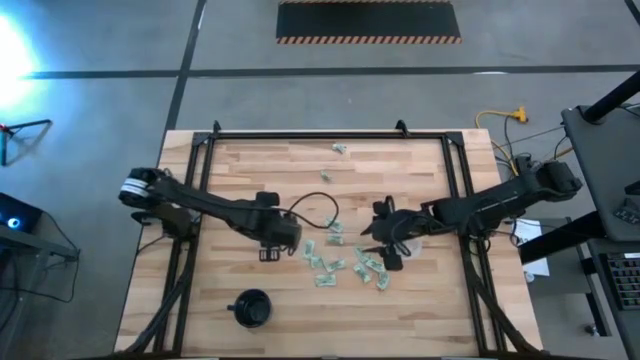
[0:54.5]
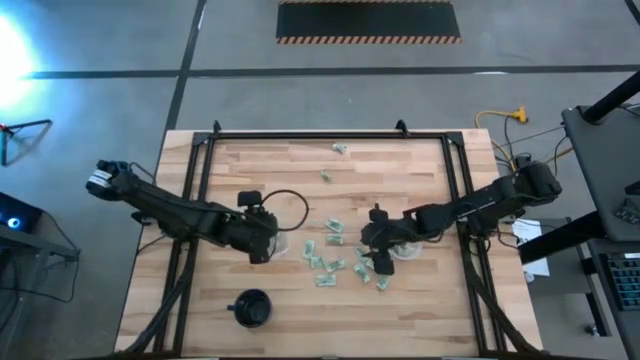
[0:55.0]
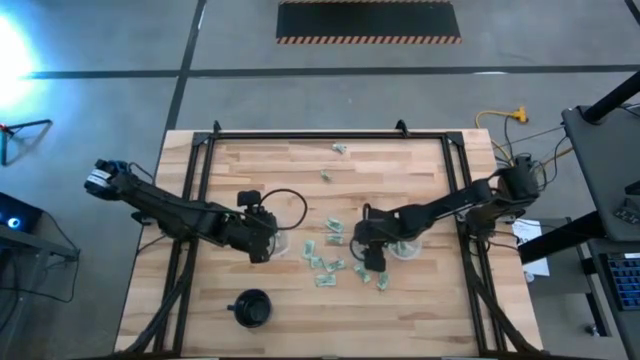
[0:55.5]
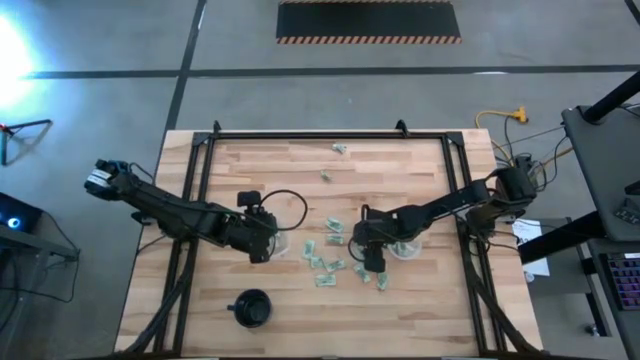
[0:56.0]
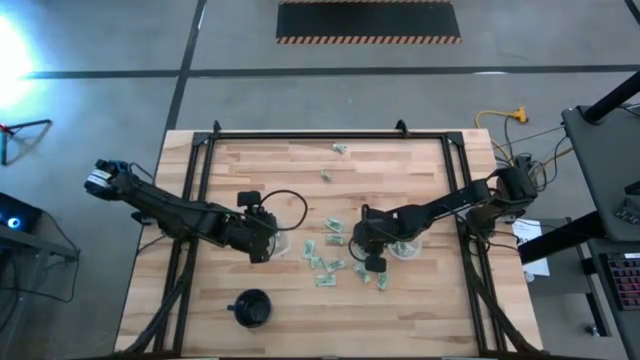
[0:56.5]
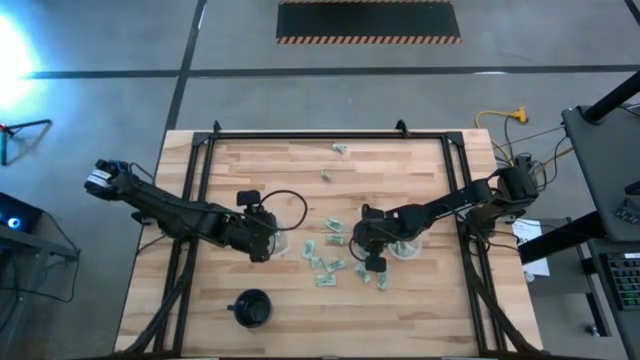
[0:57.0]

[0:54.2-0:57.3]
Task: Pick and place Stevia / Truvia into bins
Put the stevia packet into the round transparent container

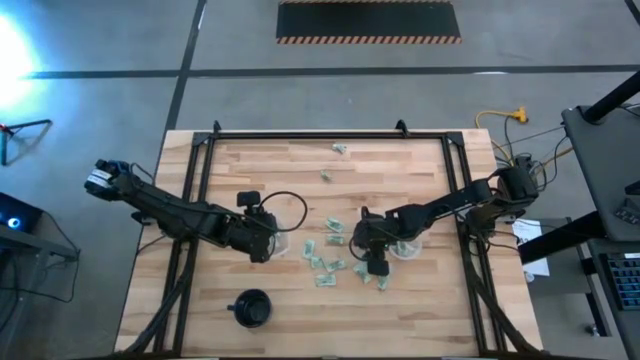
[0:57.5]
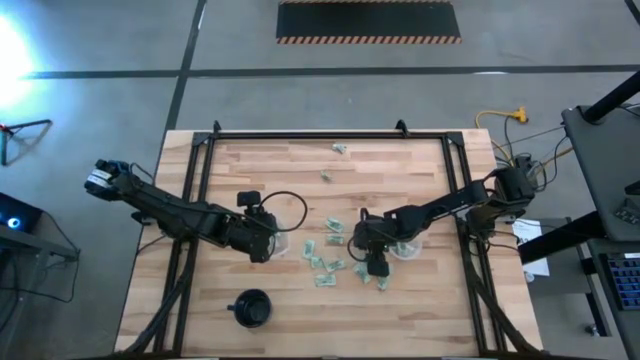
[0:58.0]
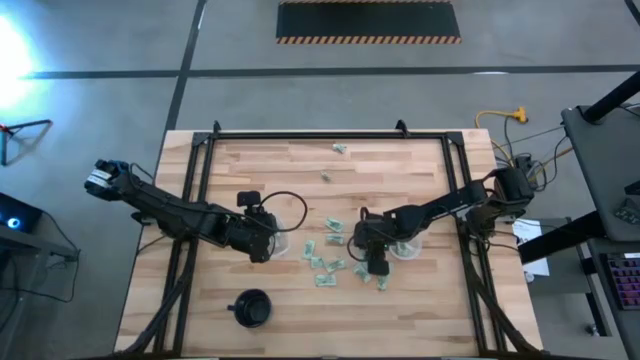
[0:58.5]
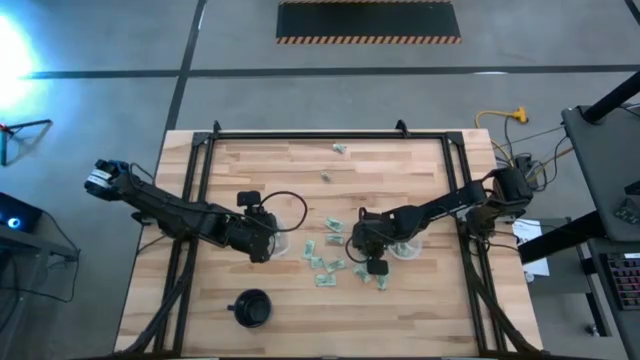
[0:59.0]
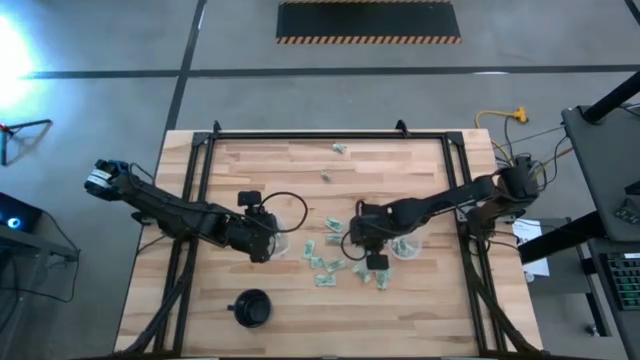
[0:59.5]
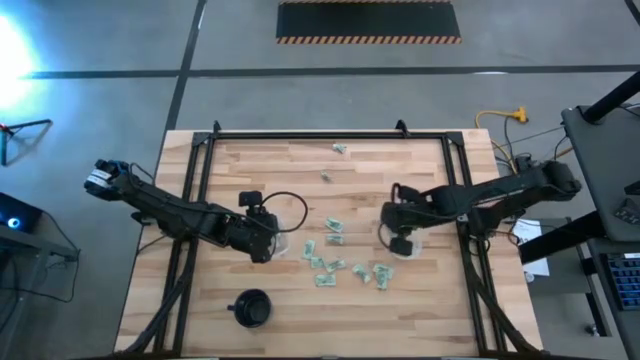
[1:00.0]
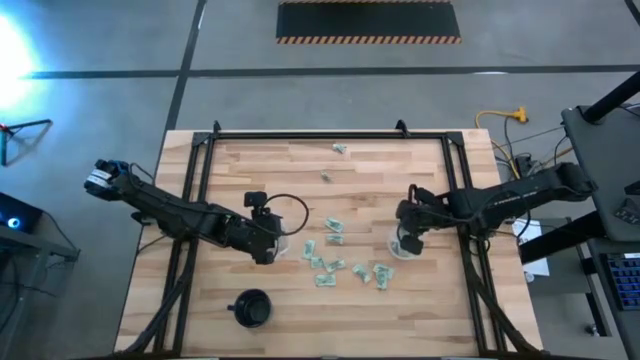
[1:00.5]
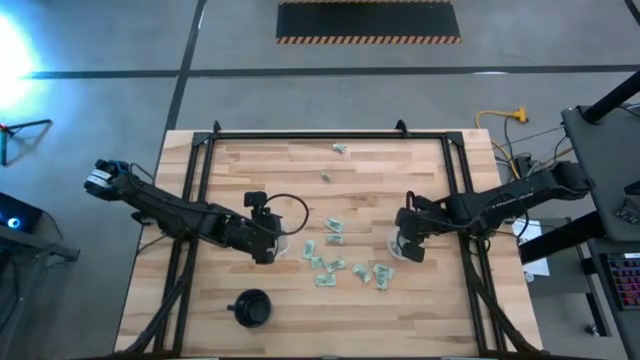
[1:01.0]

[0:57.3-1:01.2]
Put the stevia packet into the round transparent container

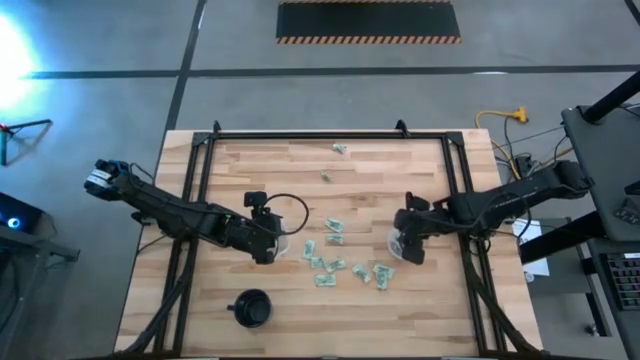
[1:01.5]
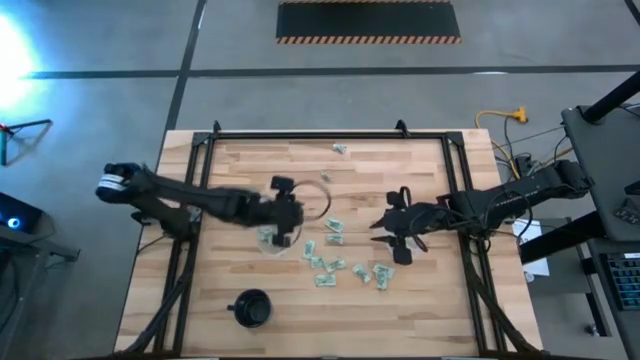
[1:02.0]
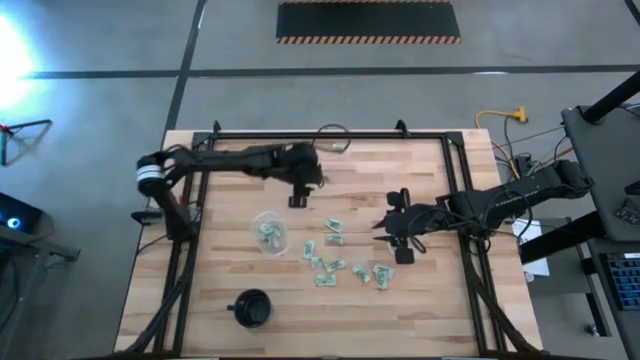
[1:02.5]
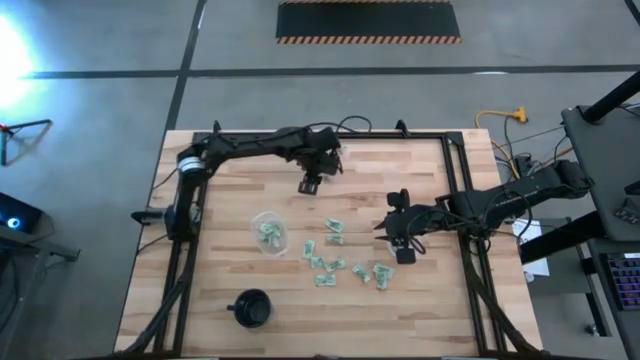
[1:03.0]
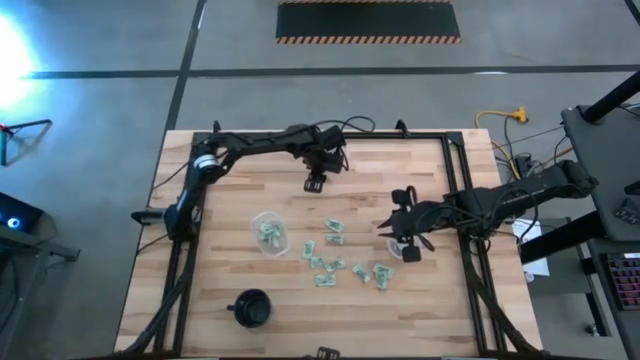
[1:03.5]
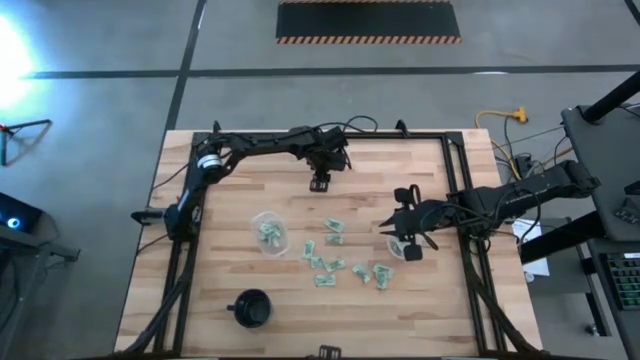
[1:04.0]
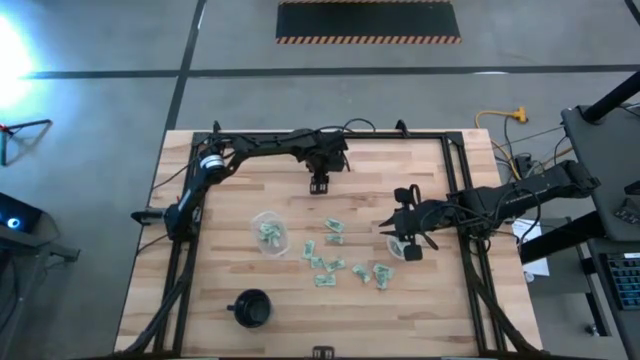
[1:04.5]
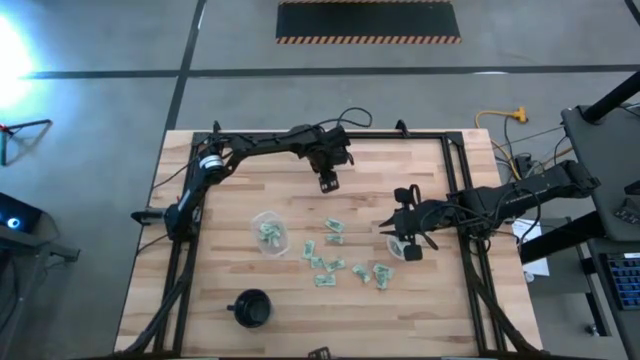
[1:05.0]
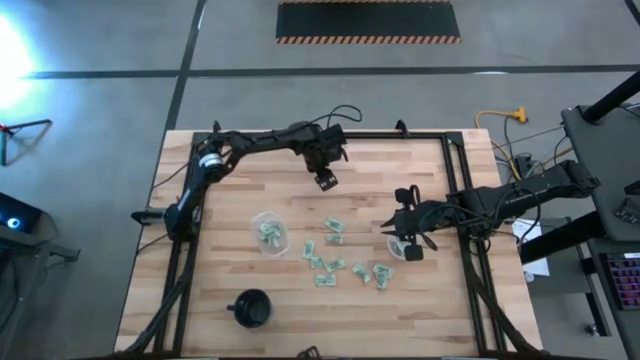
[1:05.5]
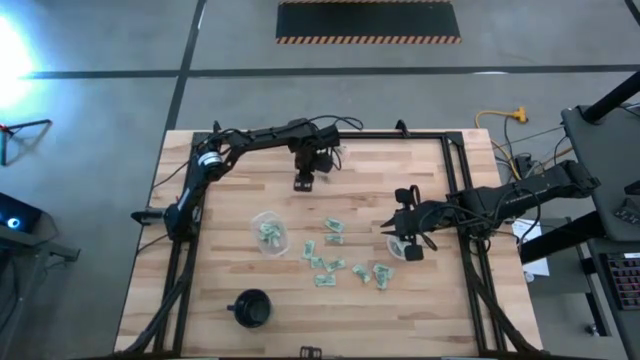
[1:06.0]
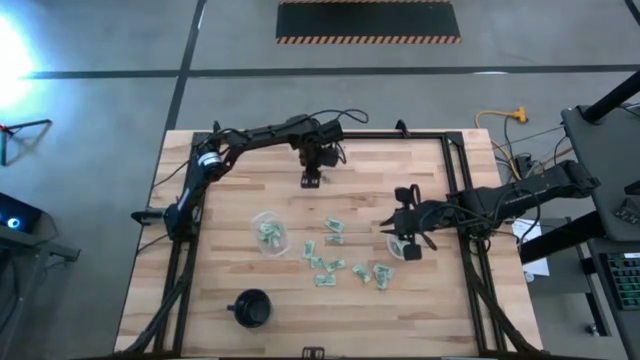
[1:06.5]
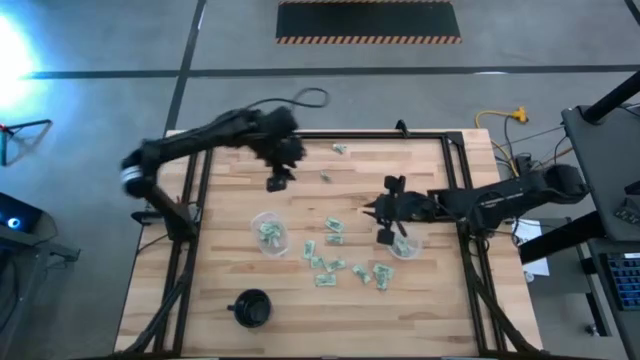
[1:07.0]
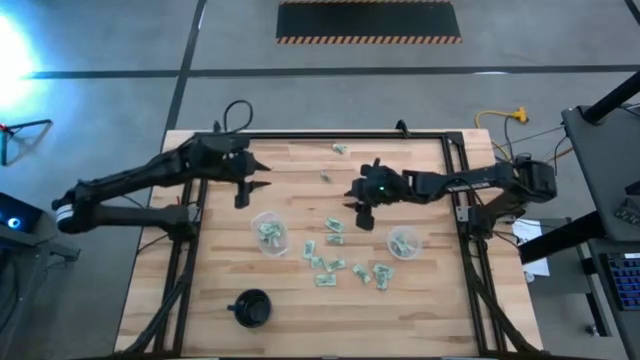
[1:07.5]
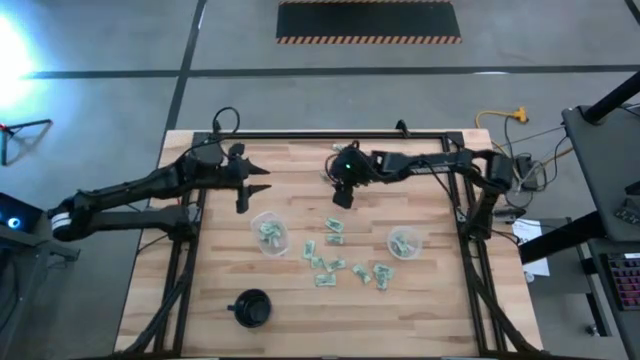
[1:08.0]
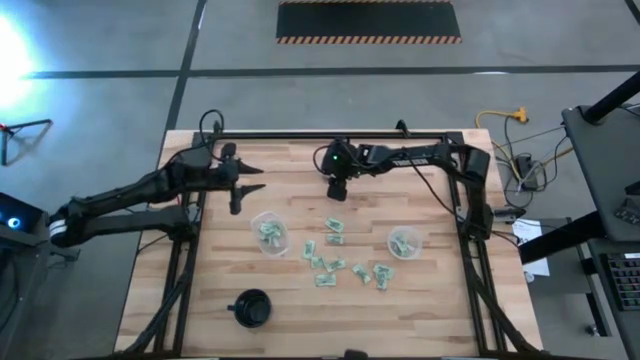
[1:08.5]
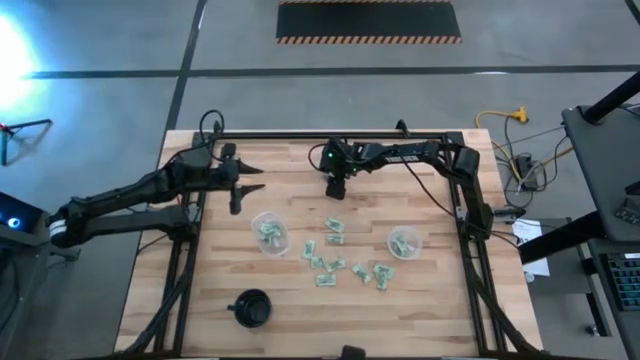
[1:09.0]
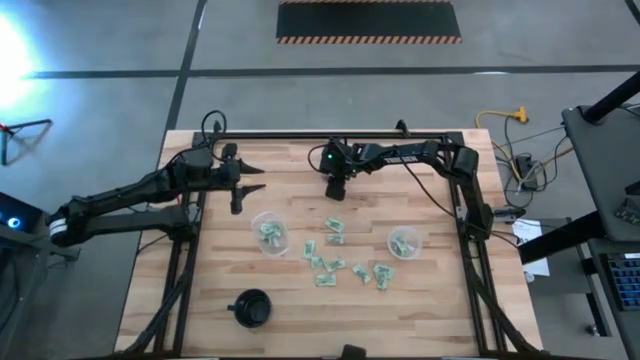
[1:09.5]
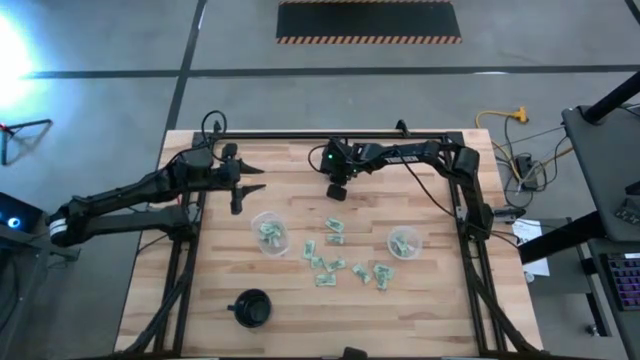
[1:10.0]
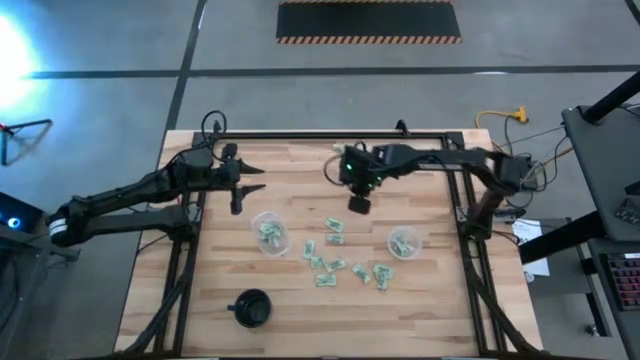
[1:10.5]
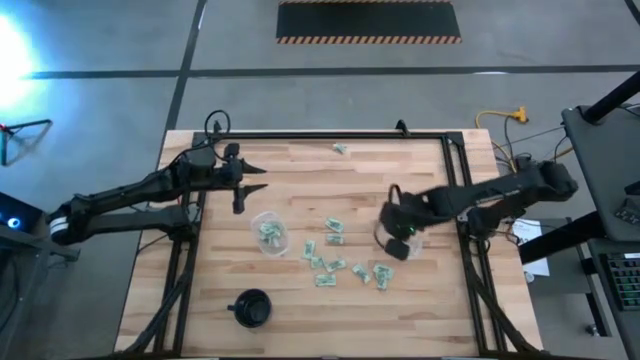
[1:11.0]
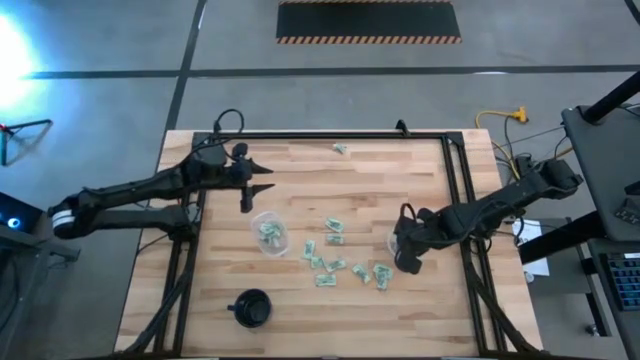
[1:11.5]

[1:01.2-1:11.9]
Put the stevia packet into the round transparent container
